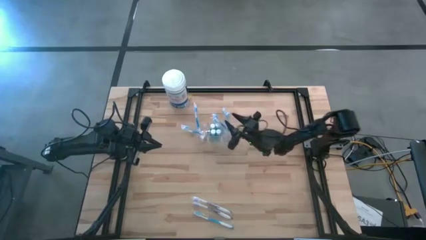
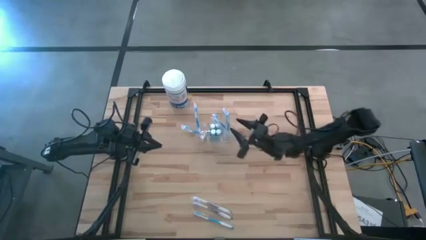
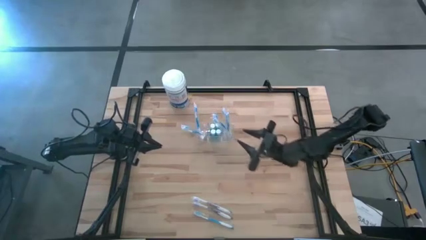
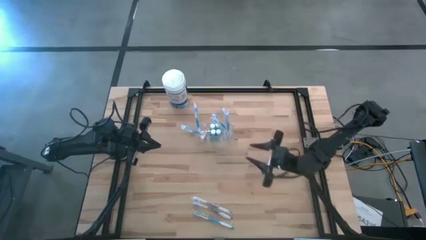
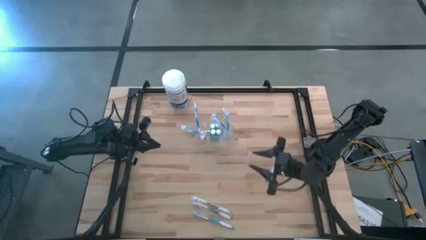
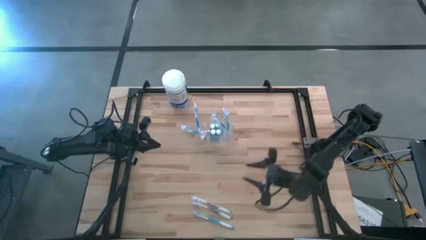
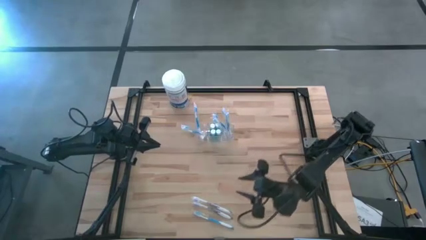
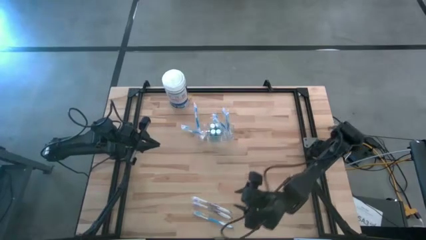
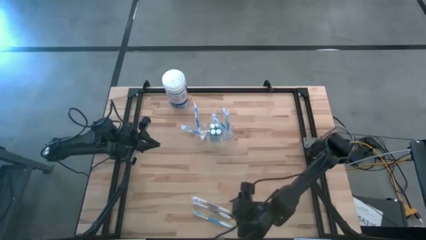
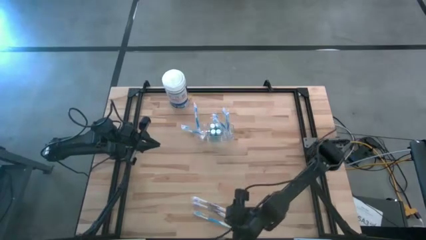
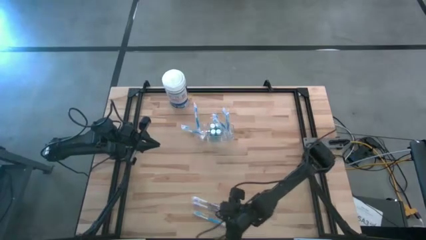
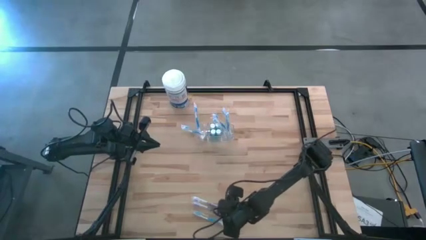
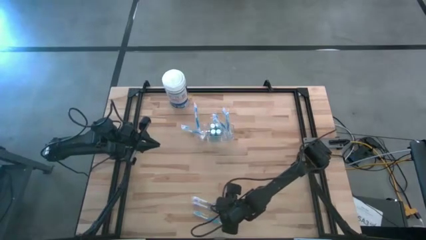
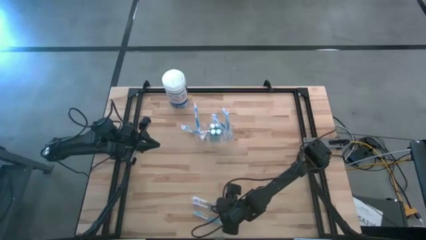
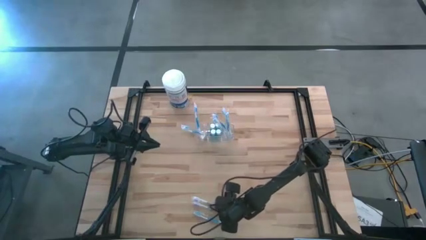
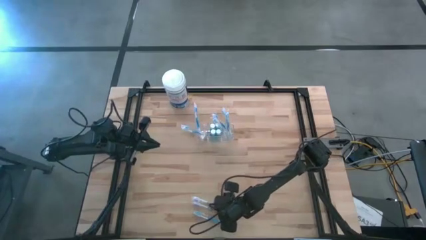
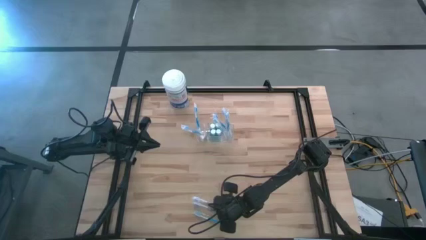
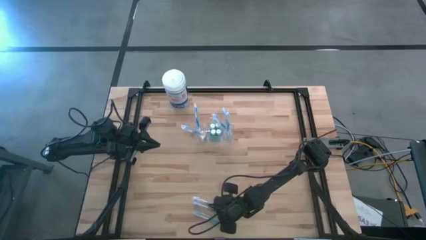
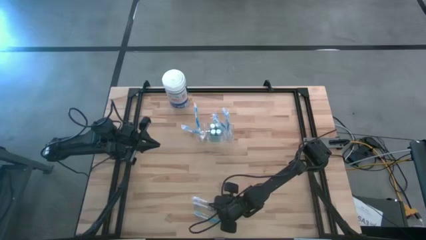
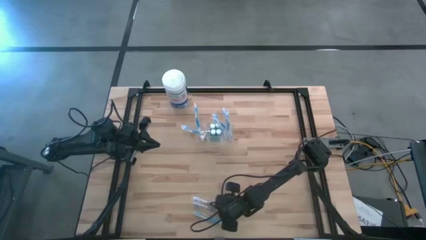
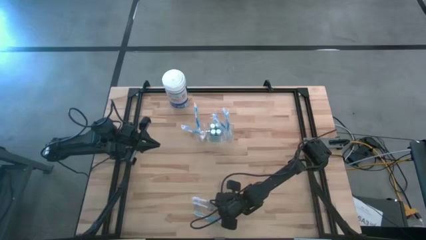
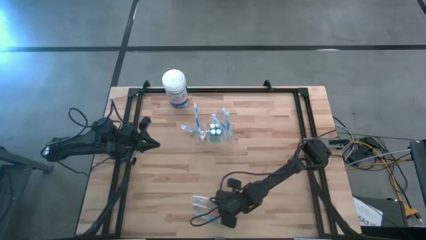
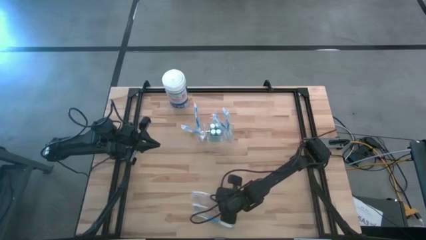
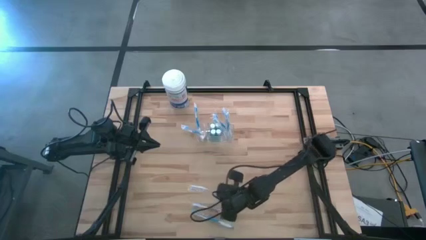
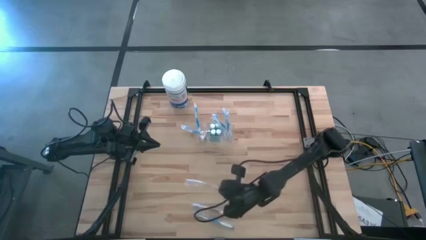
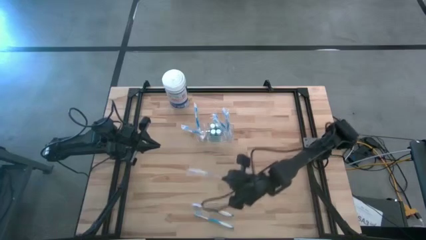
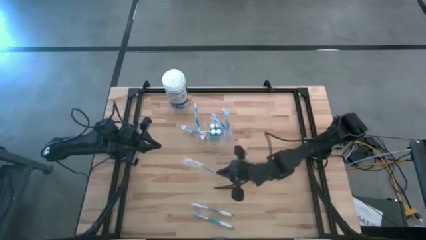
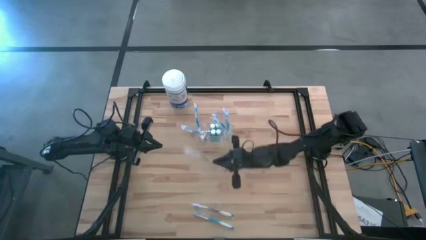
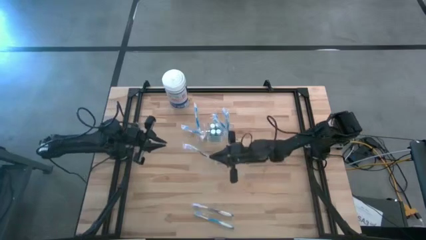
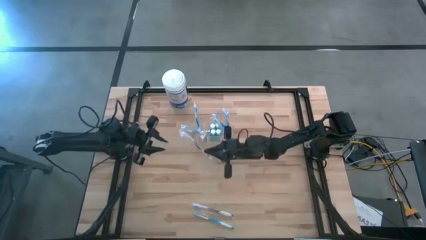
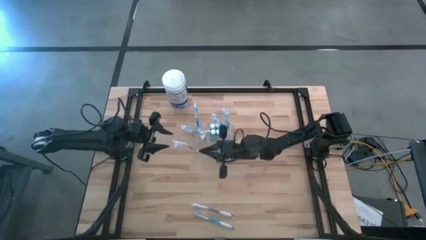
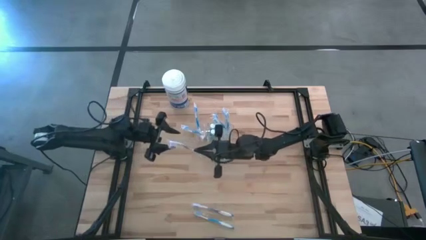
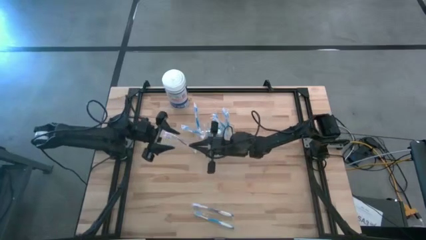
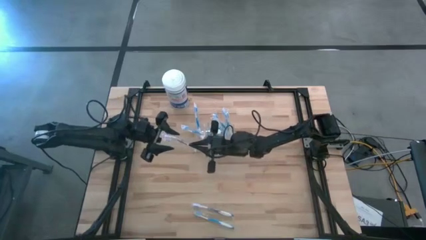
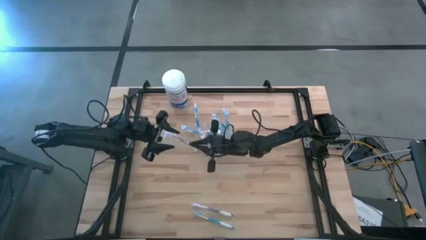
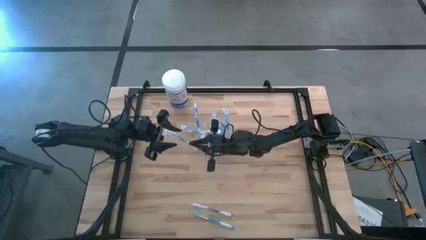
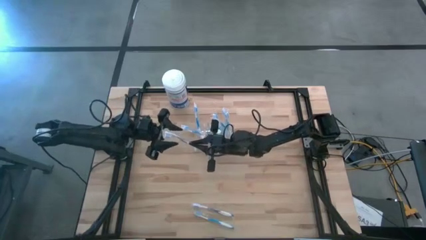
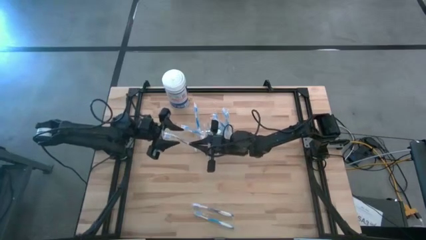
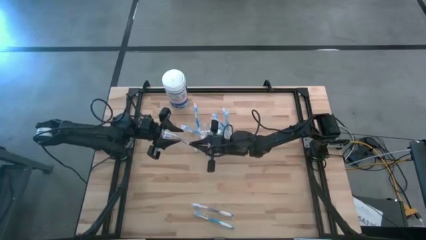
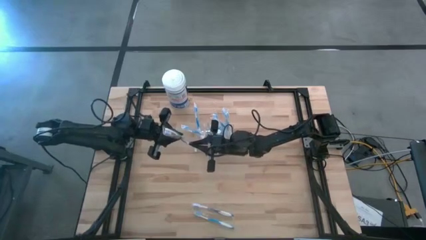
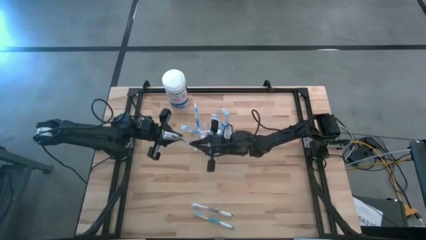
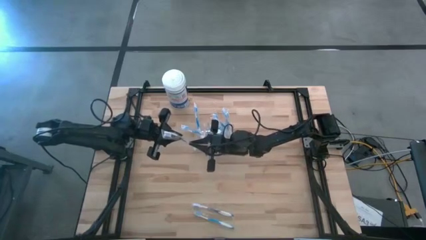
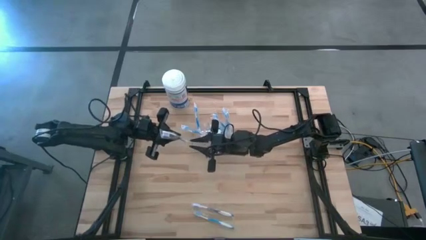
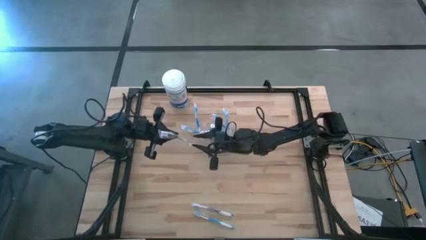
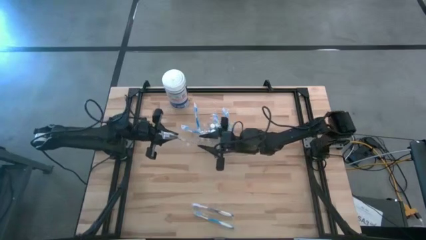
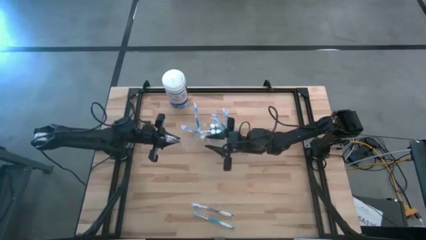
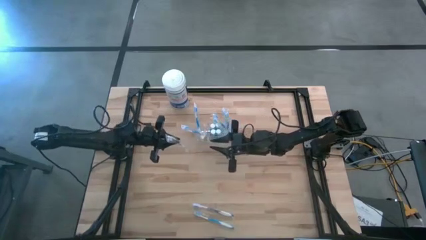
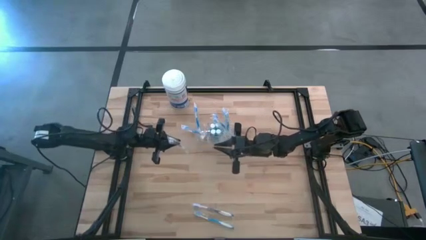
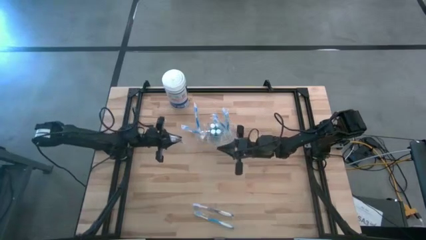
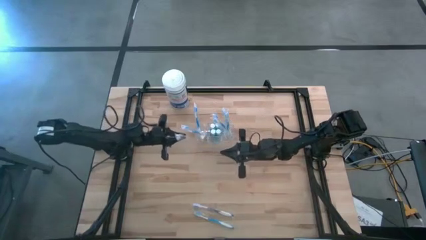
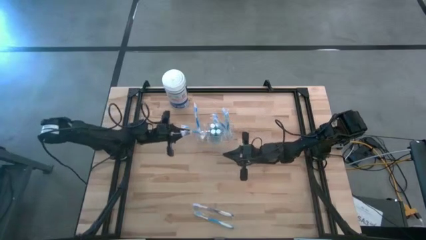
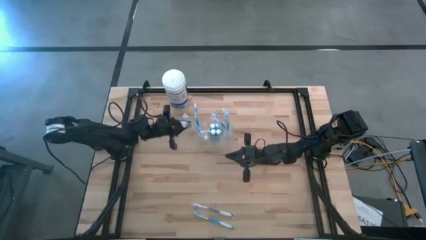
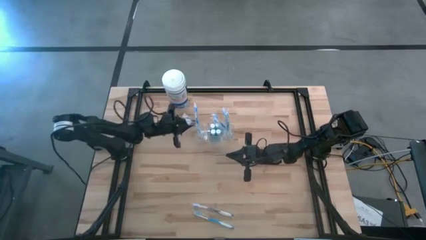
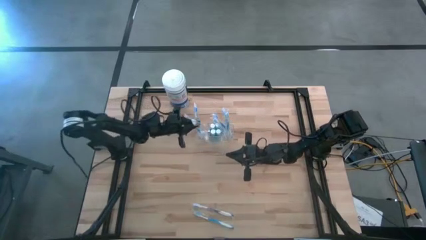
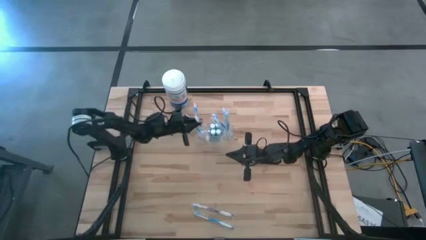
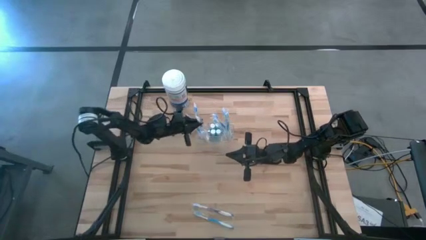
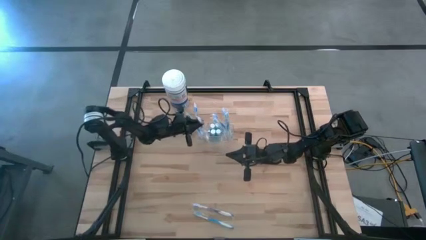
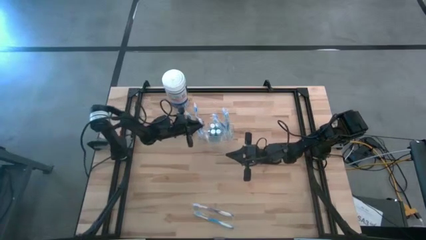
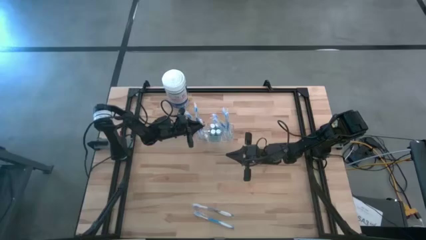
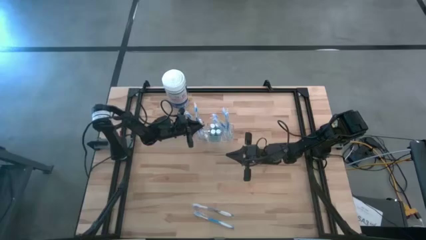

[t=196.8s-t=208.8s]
Task: Pick & Place toothbrushing station
Put the violet toothbrush in the transparent organizer

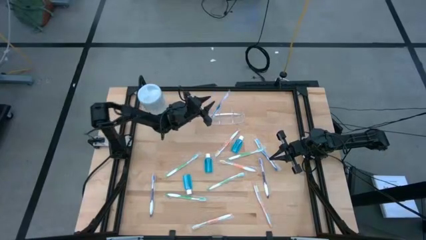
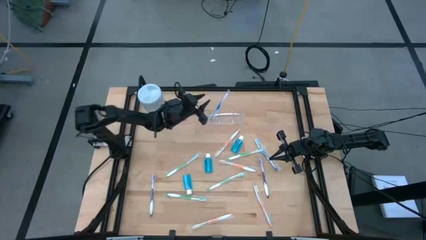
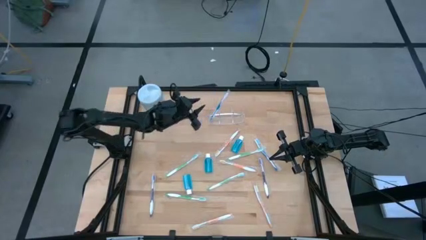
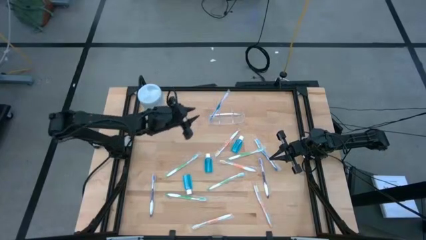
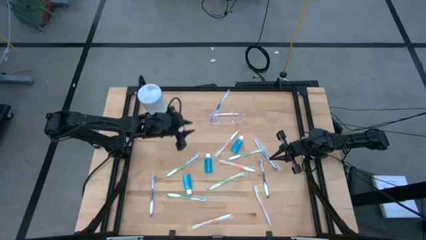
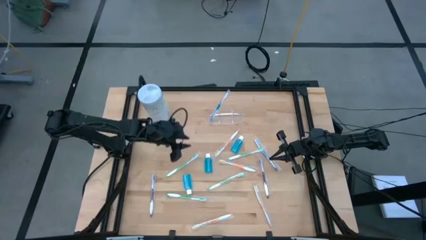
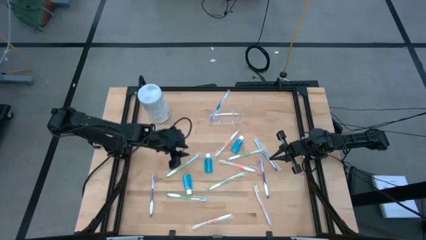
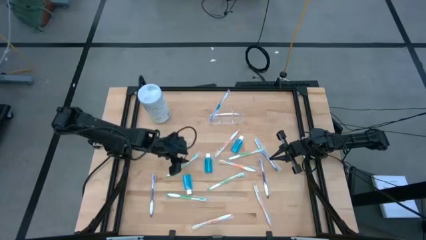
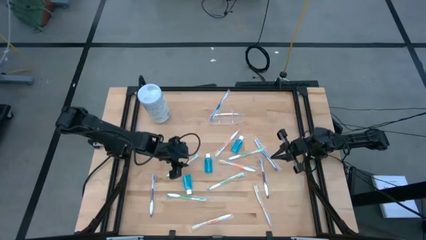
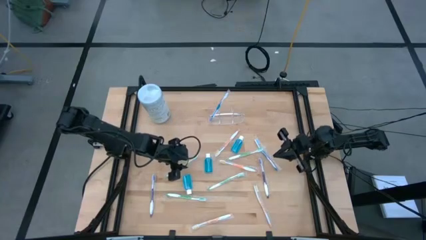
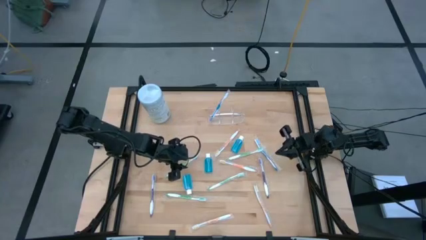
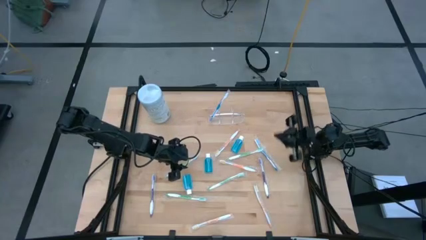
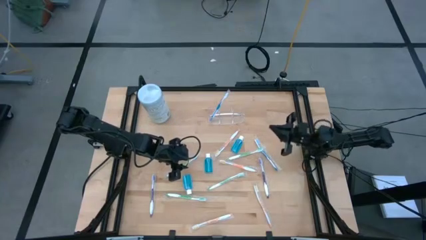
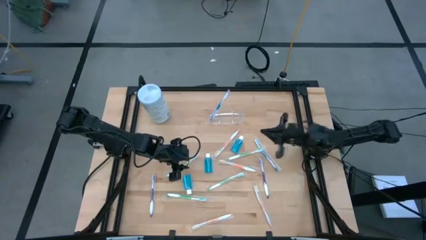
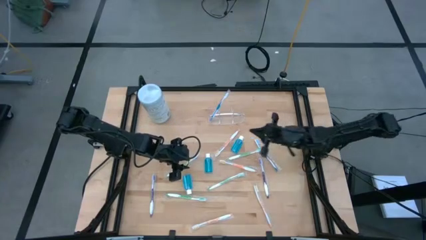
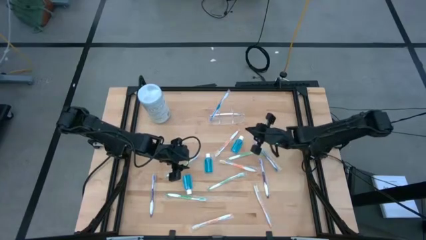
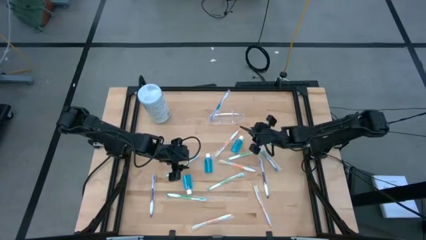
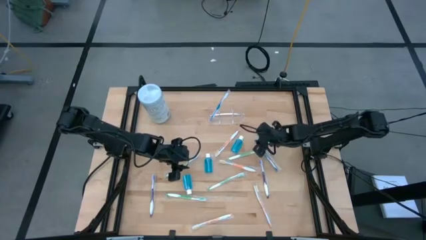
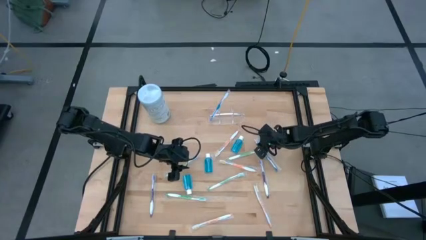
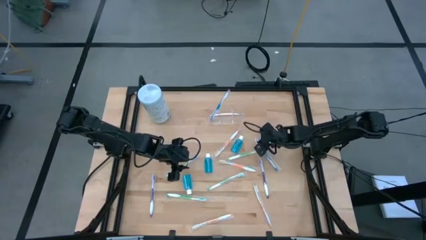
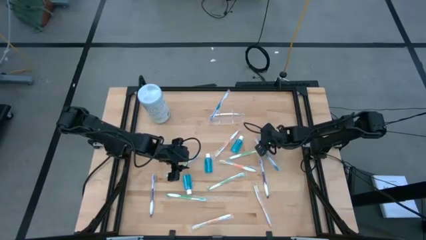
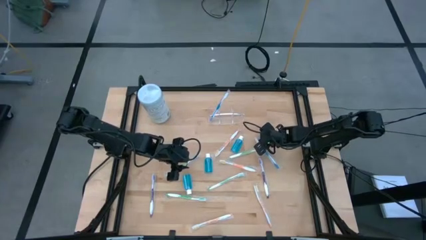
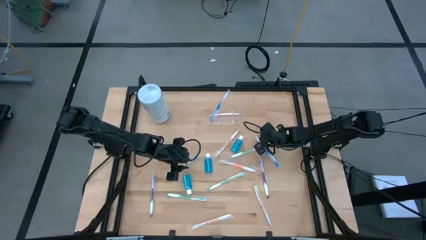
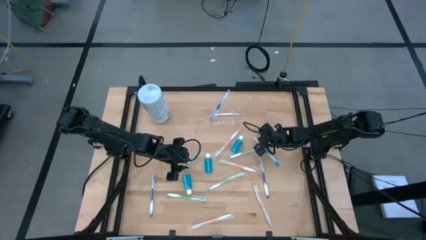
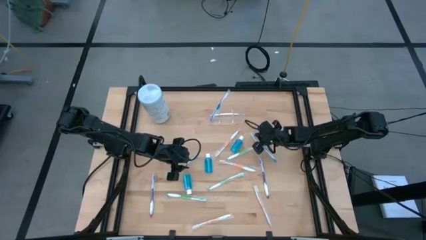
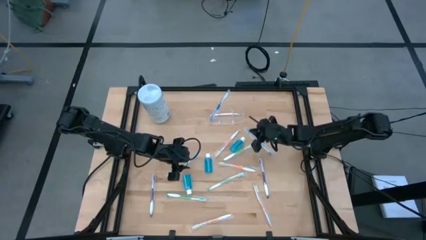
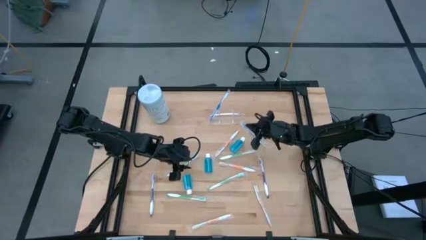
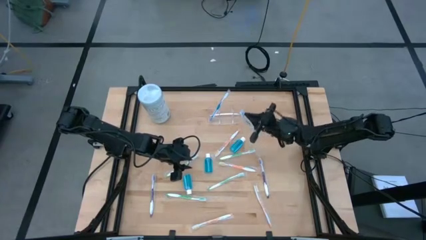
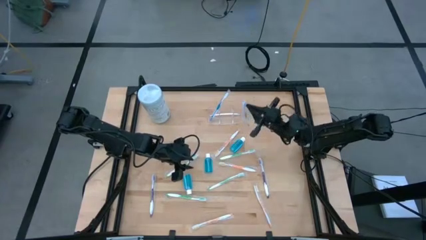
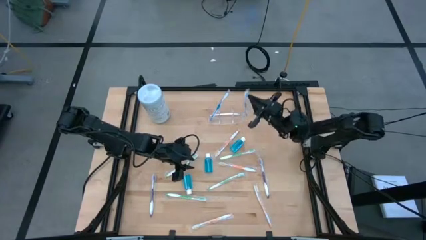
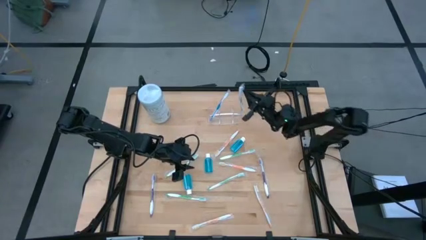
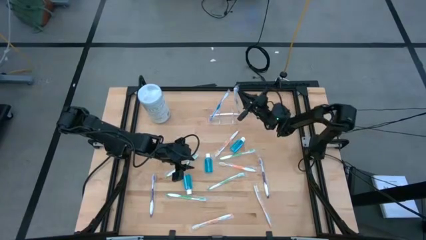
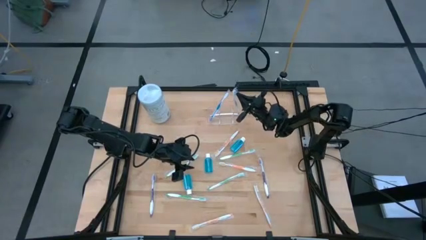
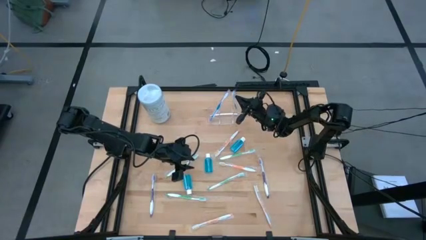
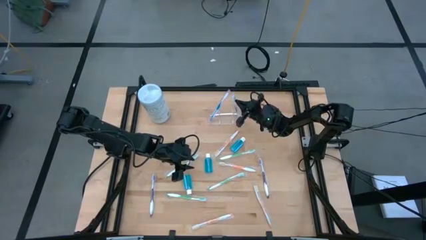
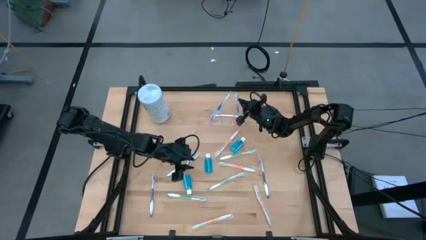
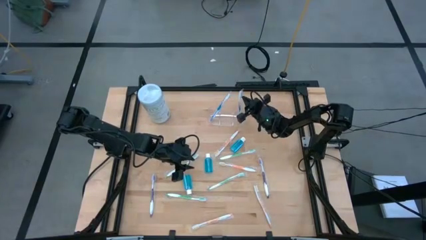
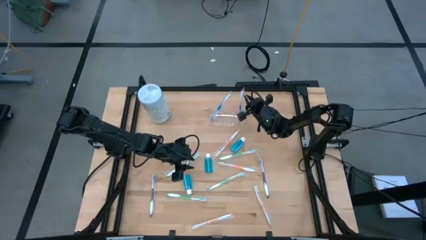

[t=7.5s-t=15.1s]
Task: Pick & Place toothbrushing station
Put the blue toothbrush into the transparent organizer
